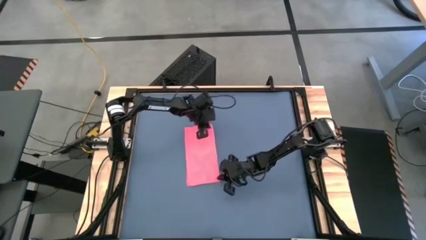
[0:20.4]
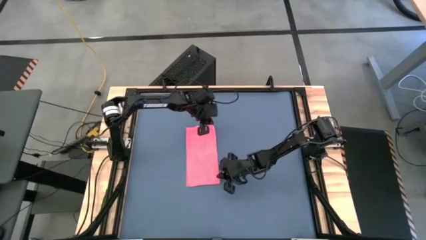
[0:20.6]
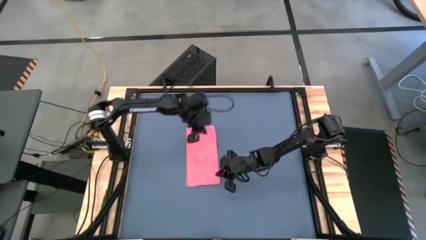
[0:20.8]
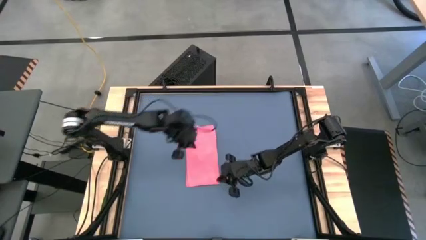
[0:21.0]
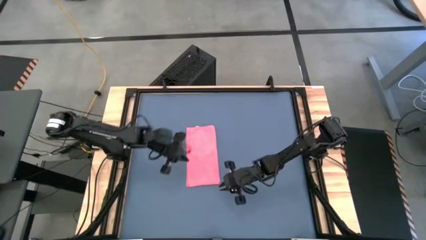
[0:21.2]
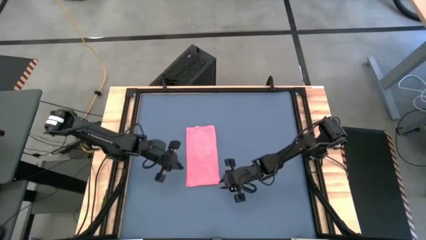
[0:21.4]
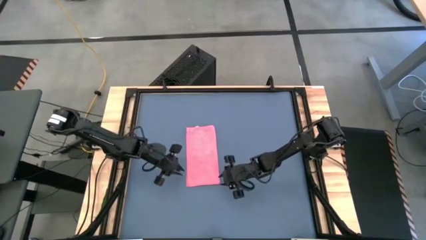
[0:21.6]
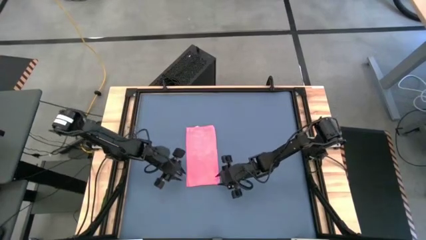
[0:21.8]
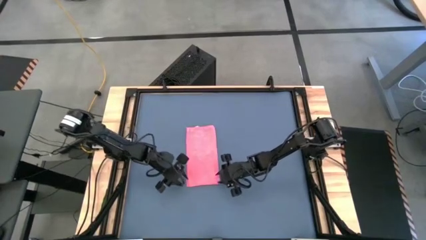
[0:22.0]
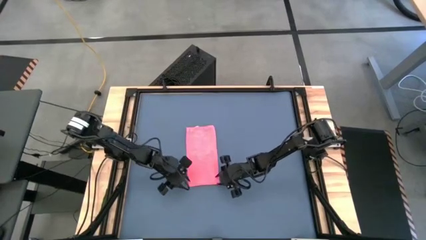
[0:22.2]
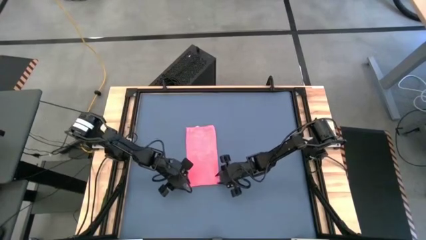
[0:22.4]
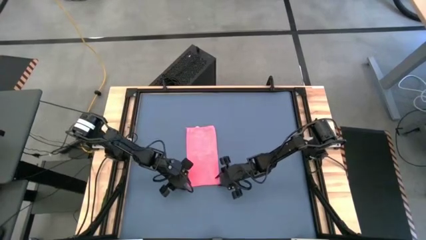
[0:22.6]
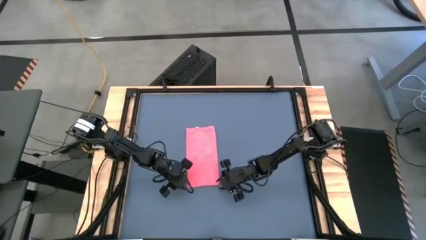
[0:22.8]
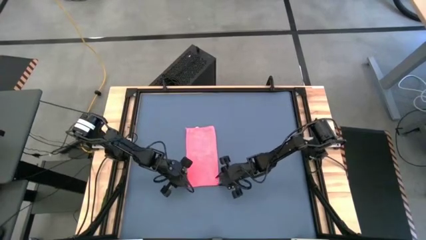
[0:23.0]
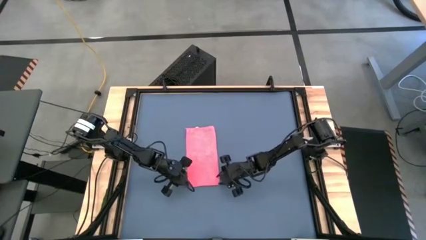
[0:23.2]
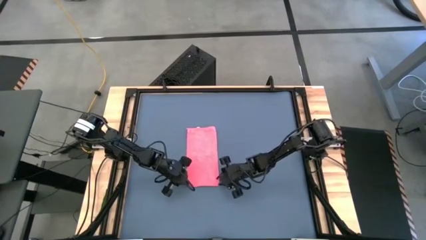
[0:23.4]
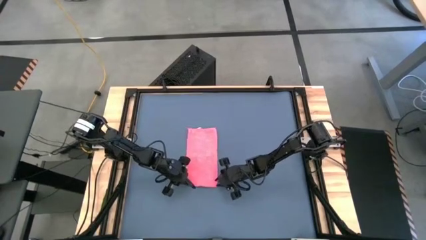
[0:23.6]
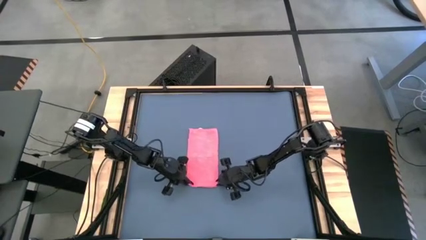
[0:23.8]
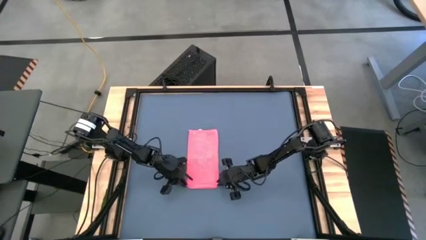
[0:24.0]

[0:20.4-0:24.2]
Task: Roll towel
Roll the red microfiber cloth

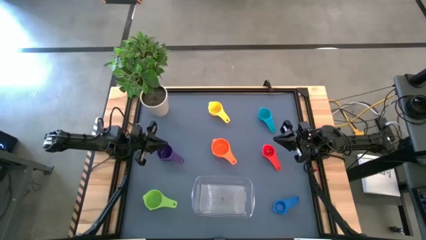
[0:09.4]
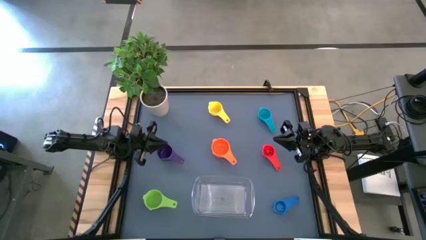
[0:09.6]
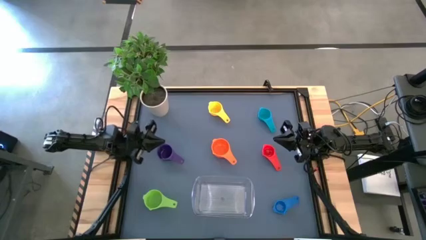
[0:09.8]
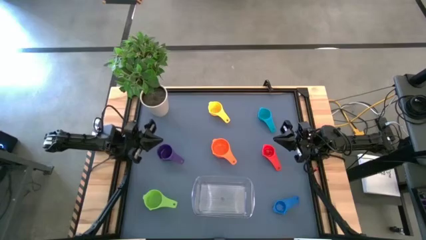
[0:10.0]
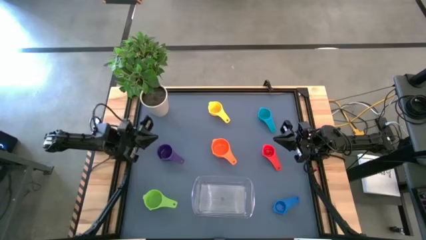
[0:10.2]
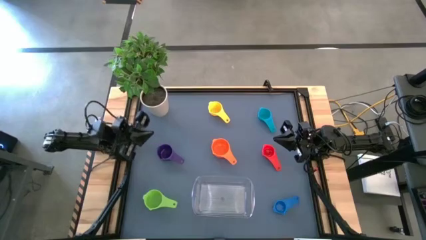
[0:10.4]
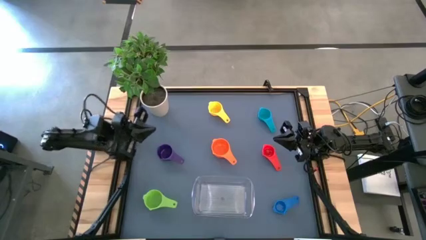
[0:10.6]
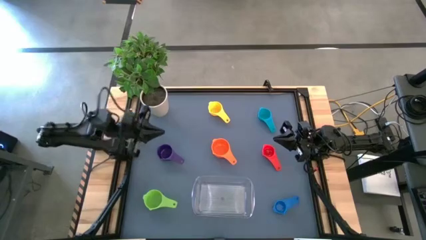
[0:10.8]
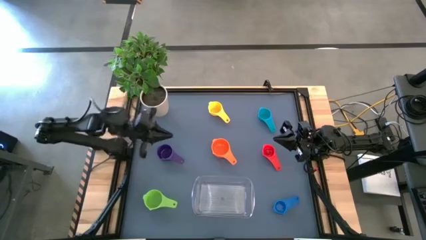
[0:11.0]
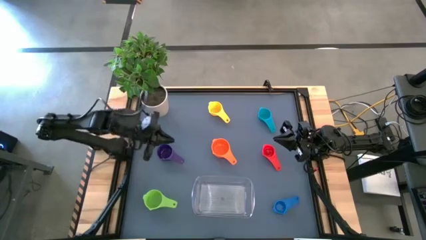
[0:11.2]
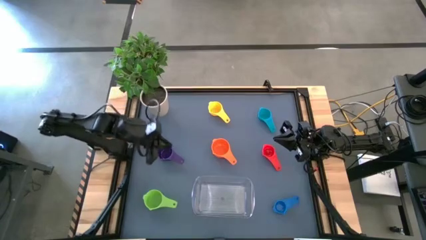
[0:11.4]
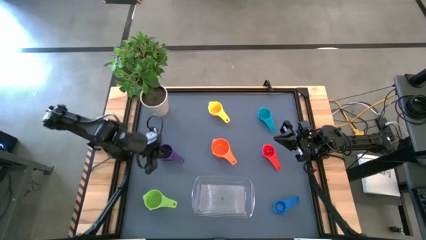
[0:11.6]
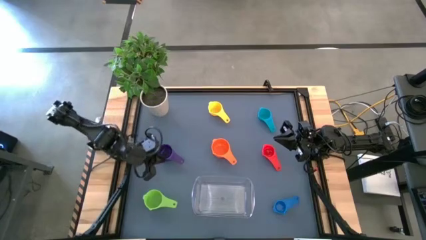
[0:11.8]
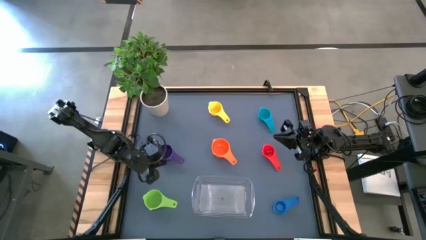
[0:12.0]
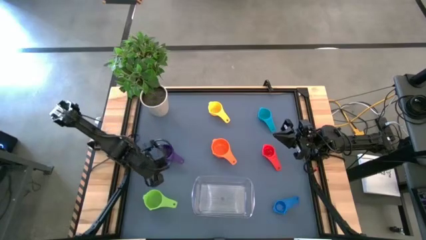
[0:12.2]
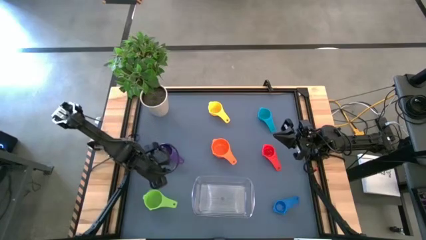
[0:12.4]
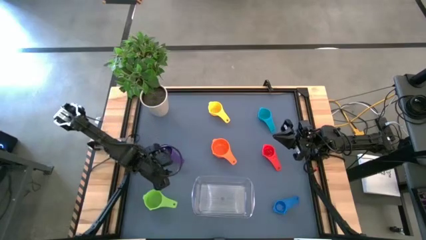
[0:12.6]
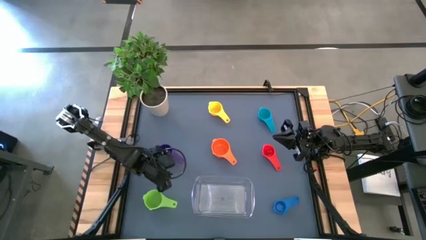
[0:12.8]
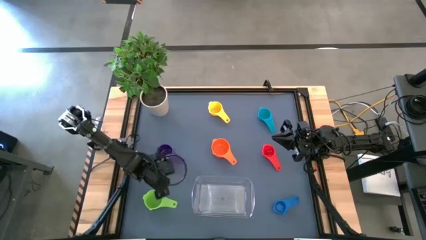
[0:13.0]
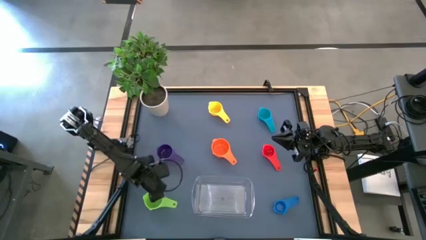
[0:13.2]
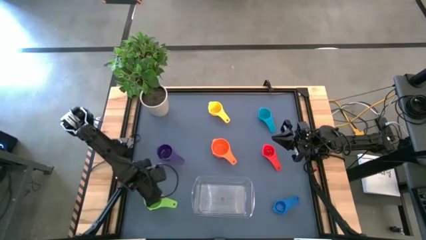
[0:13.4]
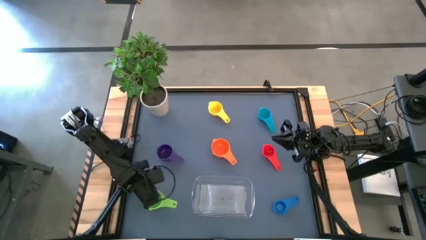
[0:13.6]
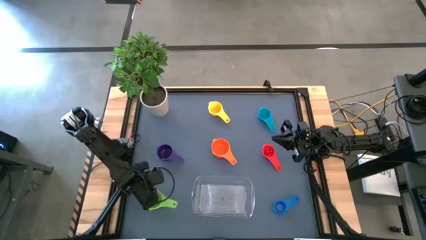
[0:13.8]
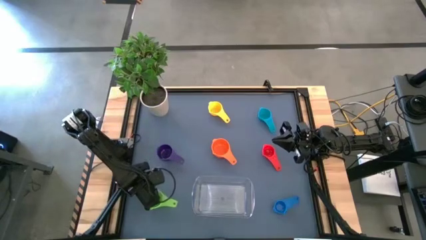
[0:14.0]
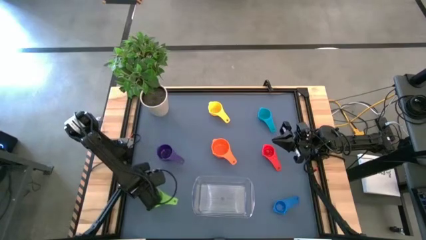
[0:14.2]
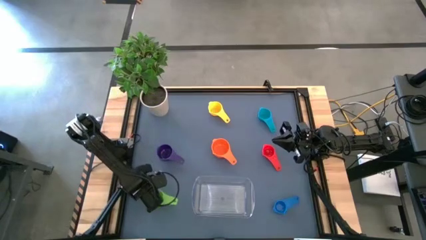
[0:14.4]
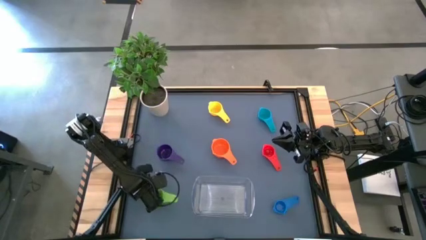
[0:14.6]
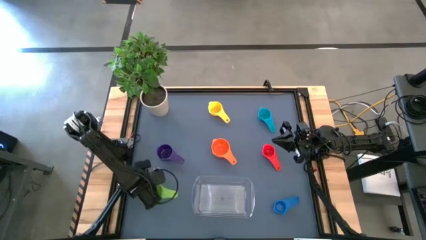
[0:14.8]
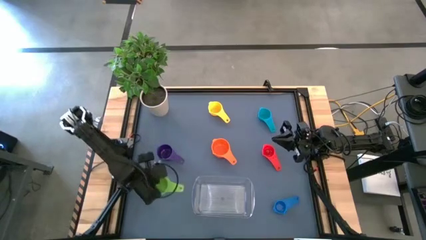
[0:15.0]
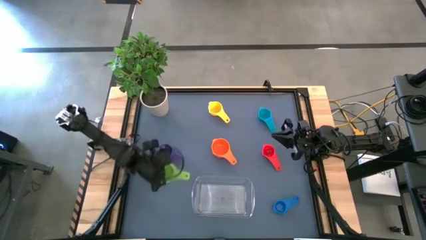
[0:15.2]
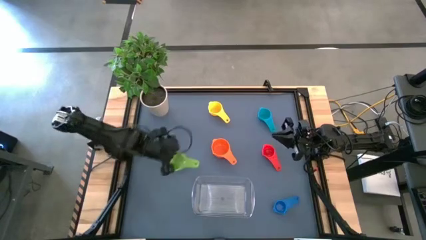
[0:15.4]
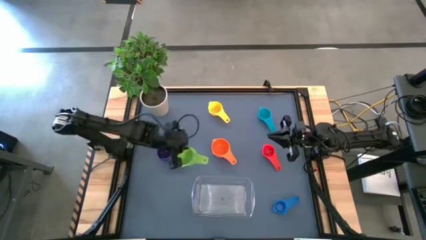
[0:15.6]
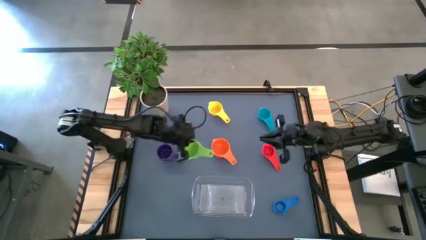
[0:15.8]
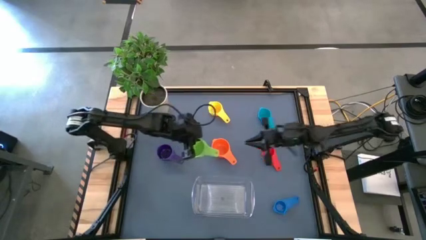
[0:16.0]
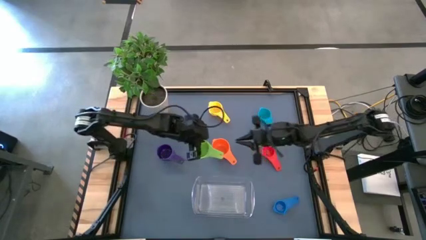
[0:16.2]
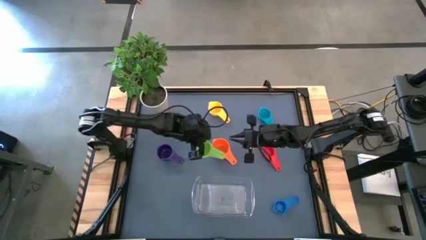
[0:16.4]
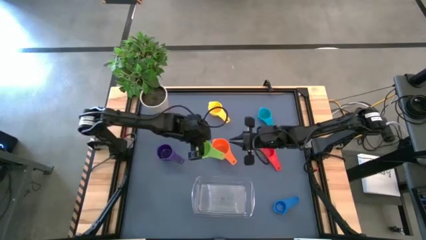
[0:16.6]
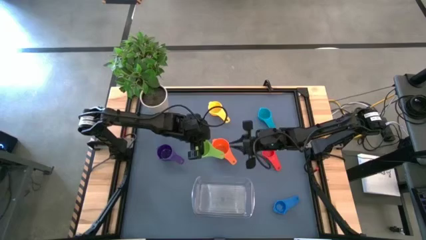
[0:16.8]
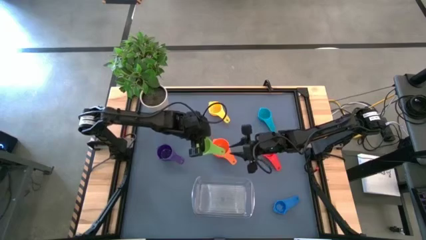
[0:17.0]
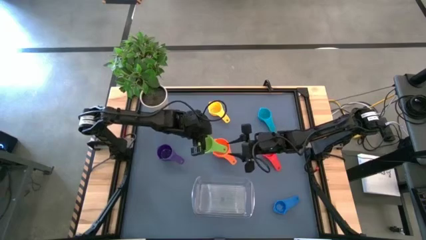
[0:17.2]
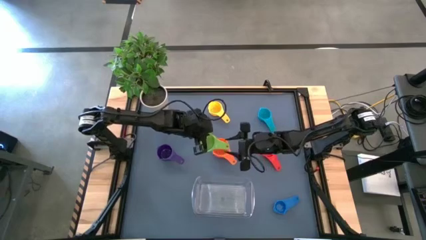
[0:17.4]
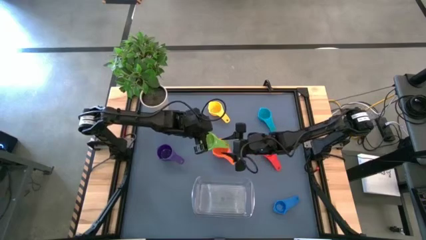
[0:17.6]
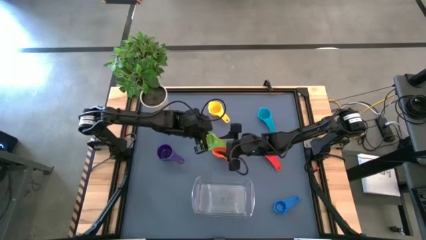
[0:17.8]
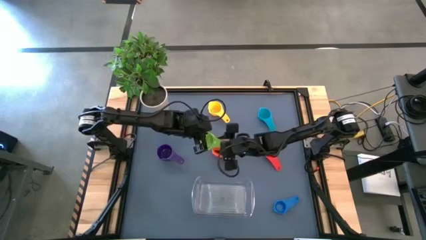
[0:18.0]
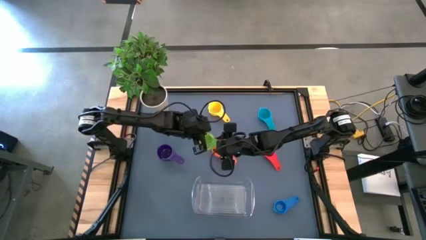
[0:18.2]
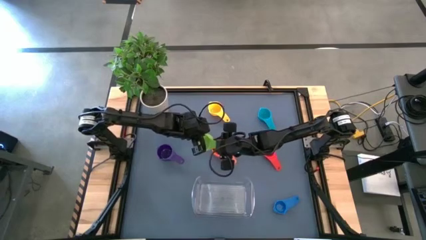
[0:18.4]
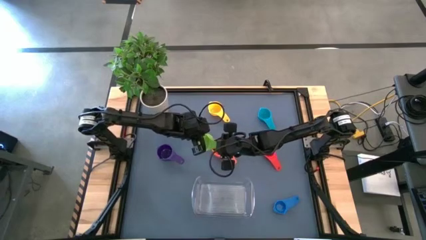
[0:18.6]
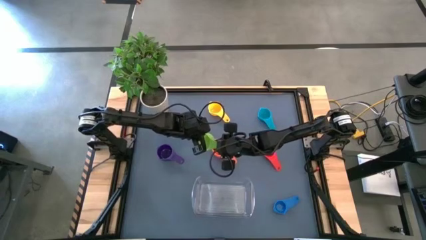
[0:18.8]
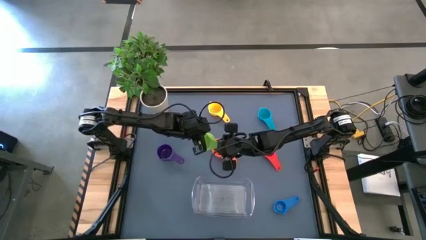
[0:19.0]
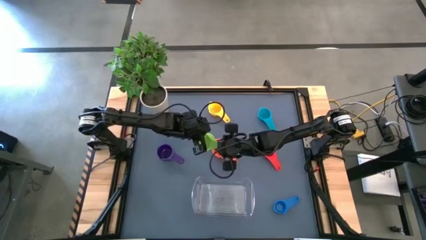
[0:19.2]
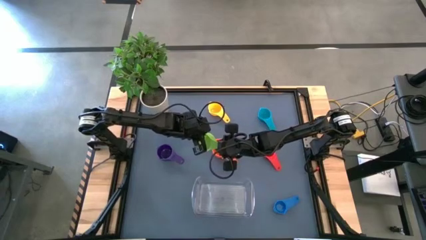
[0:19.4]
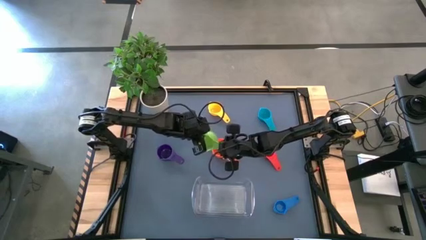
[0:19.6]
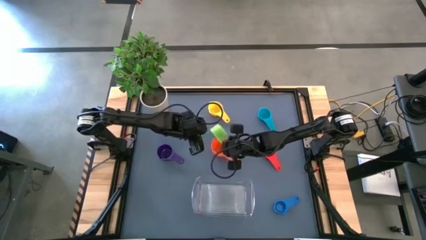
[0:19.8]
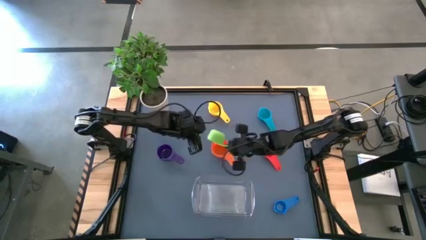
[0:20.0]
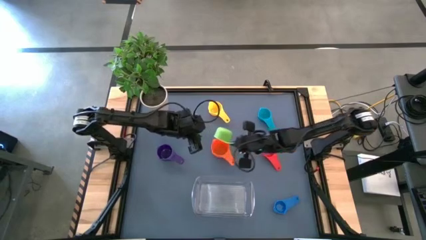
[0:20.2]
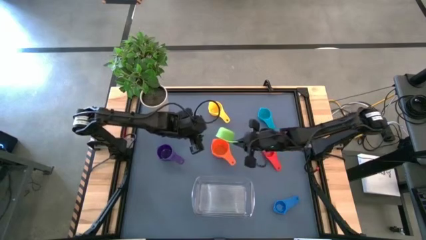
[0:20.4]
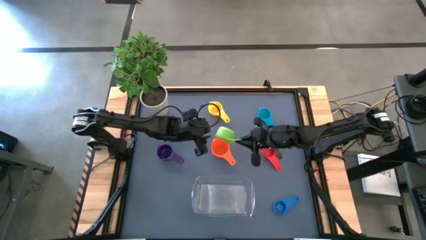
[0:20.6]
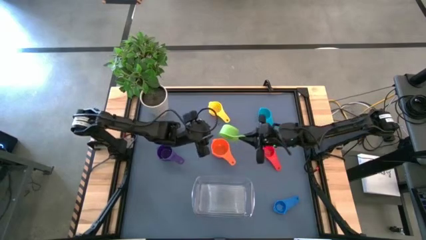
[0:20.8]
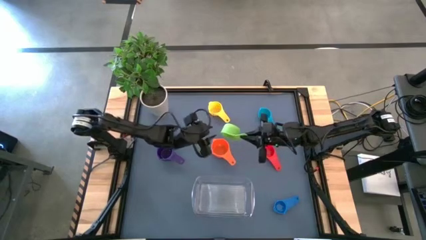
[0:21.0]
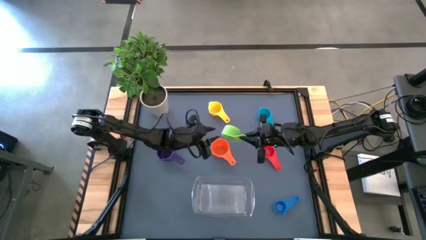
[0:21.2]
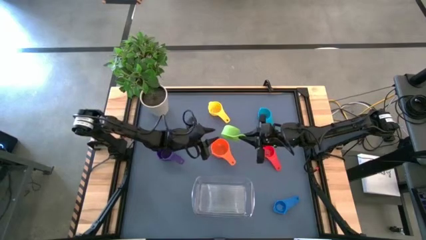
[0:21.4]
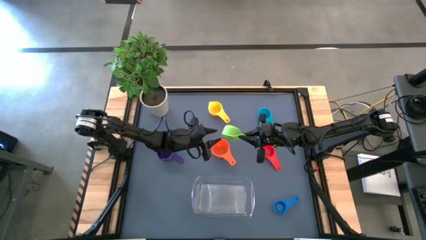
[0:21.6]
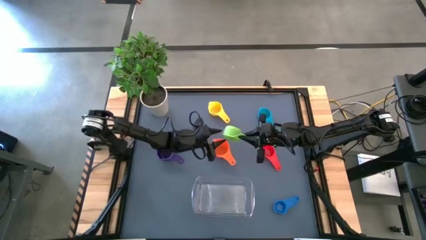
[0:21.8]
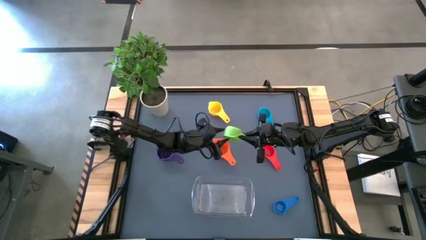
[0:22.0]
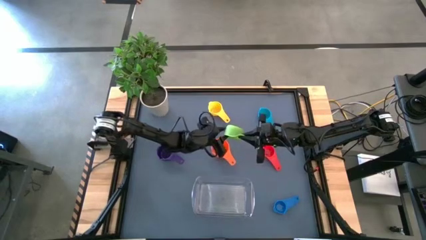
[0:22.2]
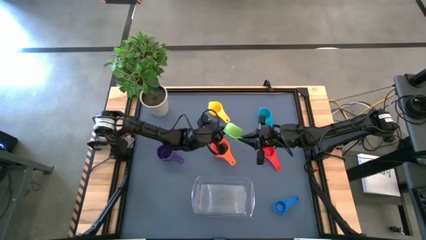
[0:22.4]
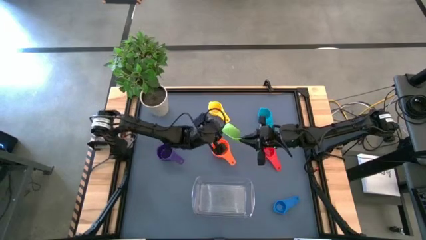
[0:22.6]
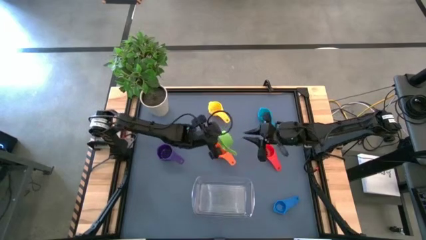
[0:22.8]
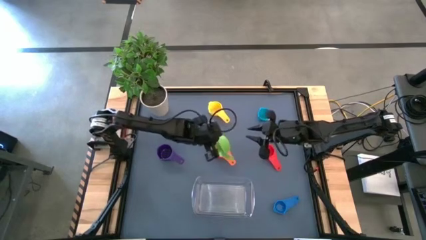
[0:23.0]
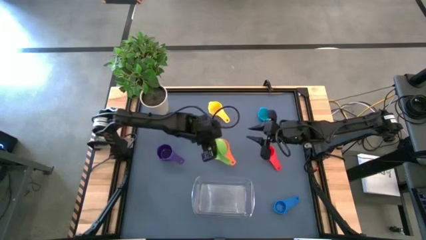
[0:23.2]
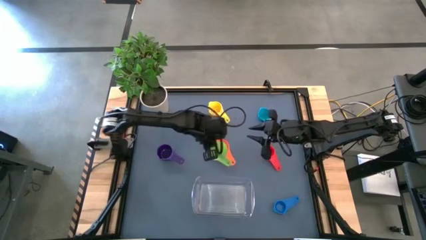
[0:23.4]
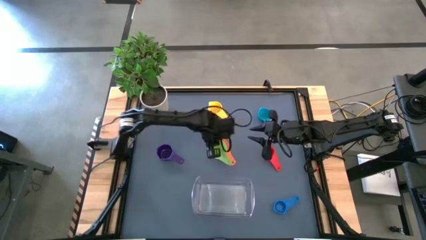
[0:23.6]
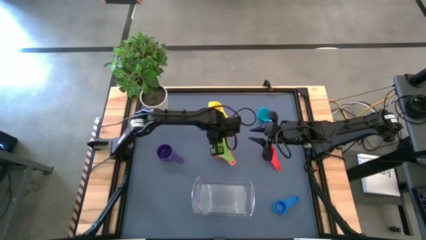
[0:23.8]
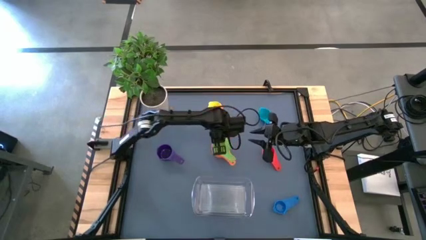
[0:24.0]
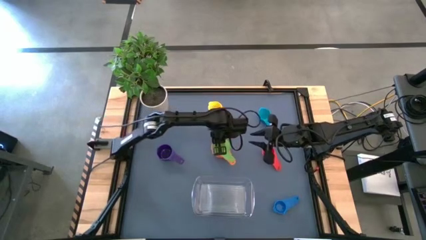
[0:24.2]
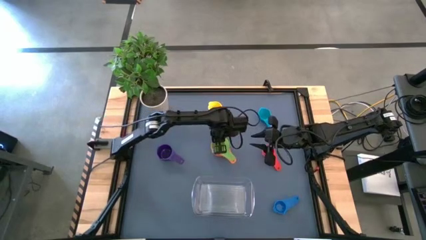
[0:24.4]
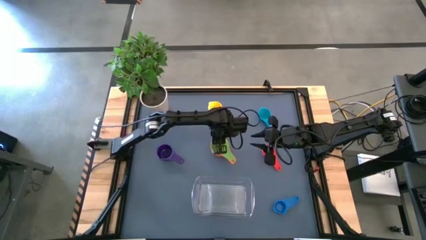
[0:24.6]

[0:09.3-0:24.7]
Task: Nest measuring cups in basket
Stack the green measuring cup on top of the orange measuring cup
